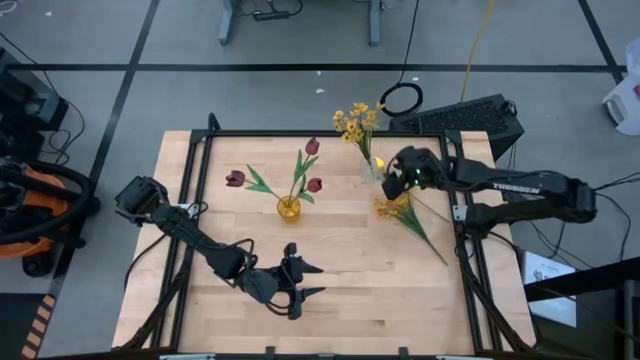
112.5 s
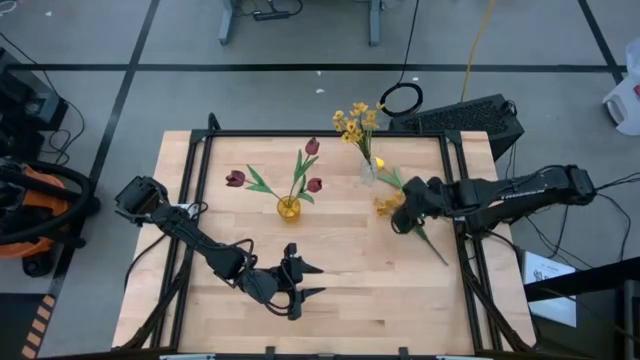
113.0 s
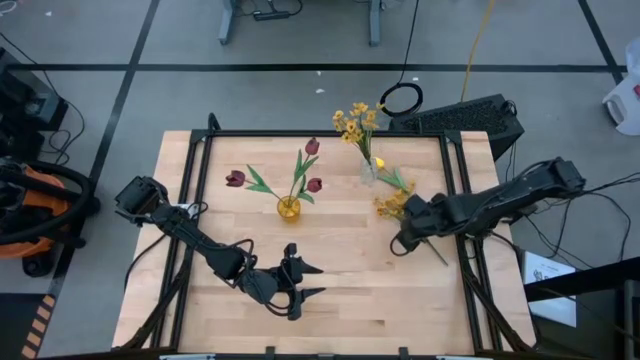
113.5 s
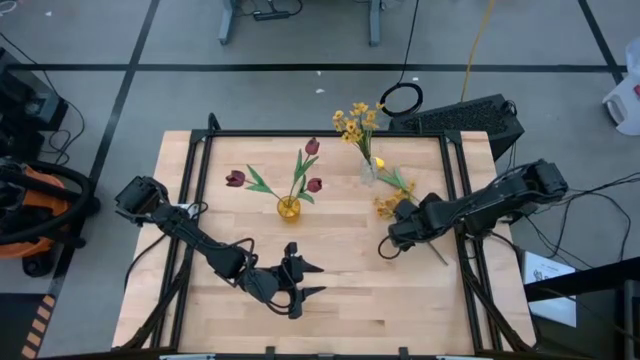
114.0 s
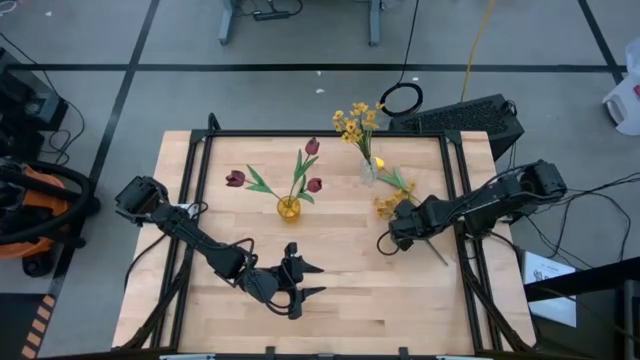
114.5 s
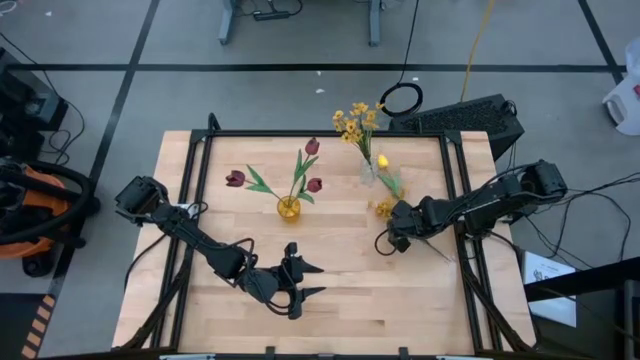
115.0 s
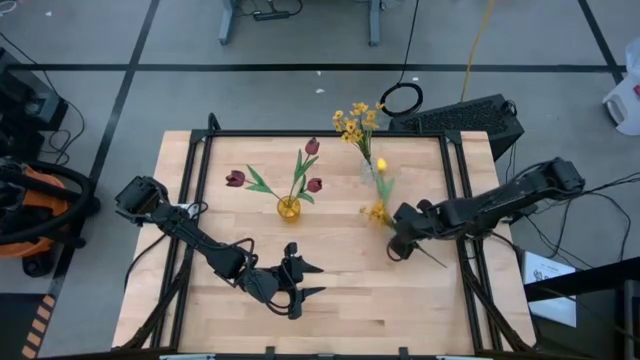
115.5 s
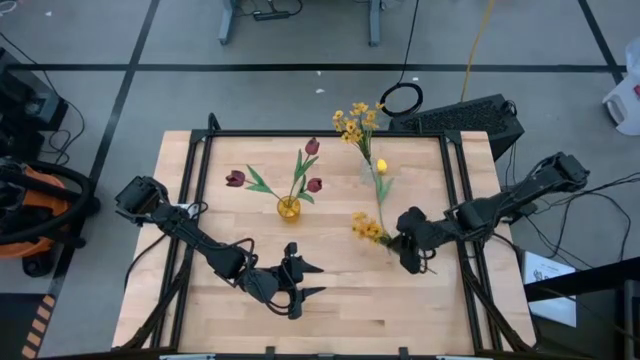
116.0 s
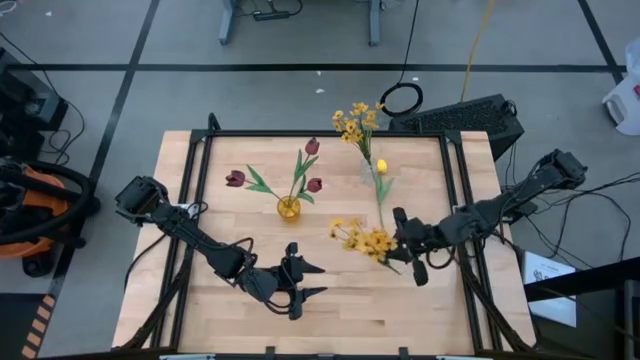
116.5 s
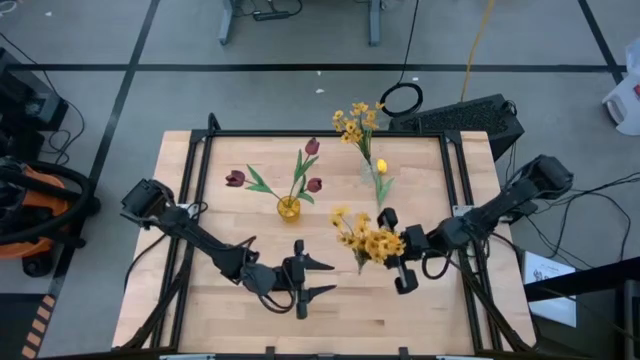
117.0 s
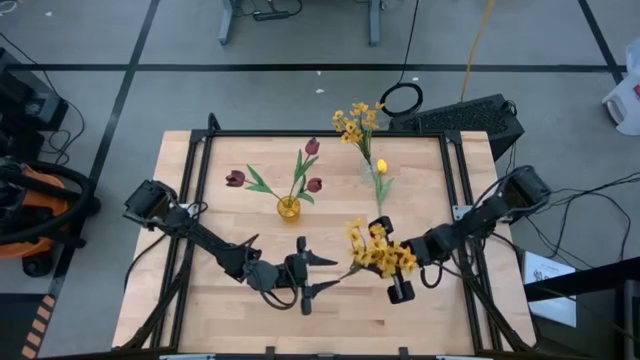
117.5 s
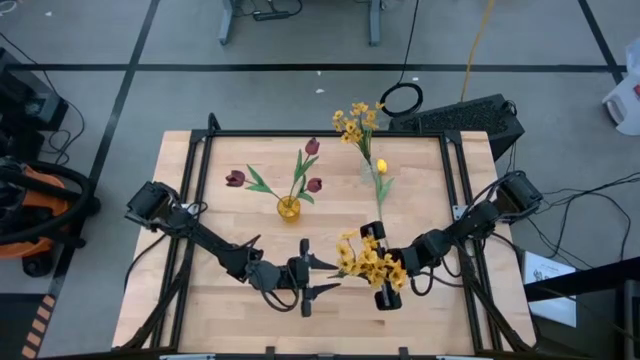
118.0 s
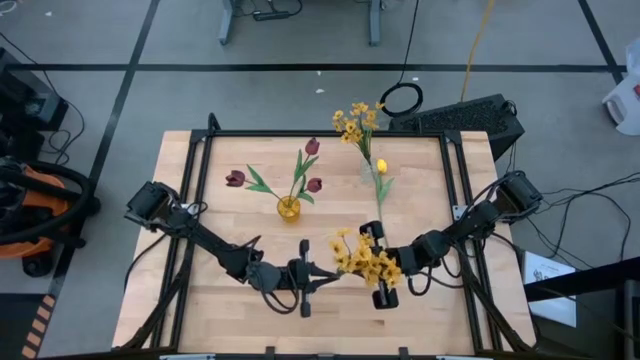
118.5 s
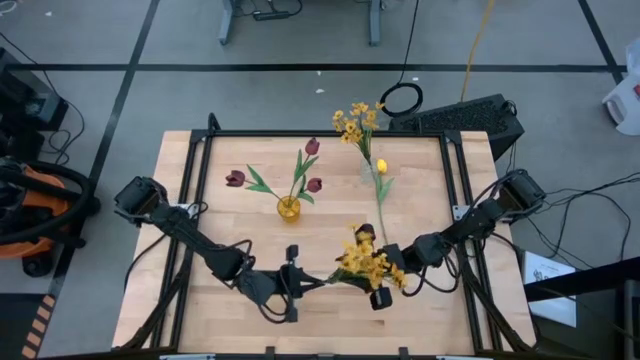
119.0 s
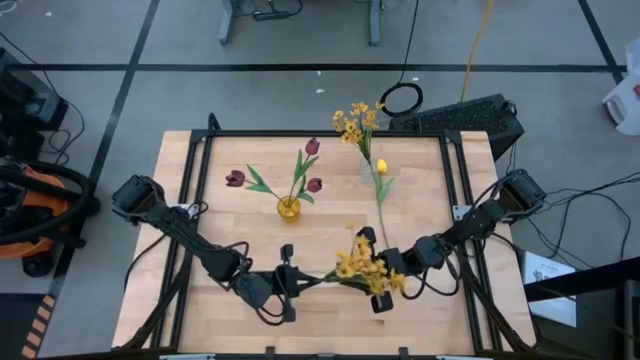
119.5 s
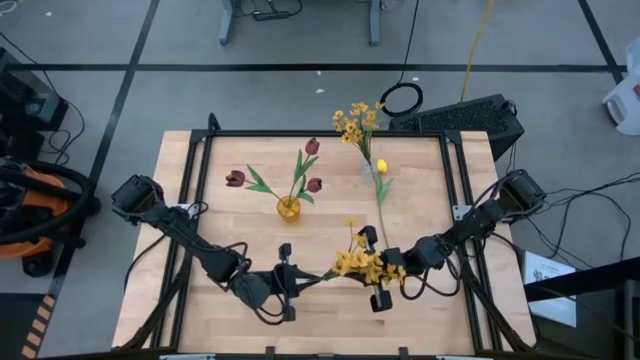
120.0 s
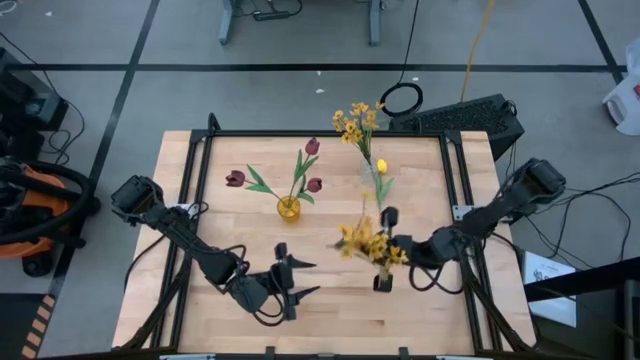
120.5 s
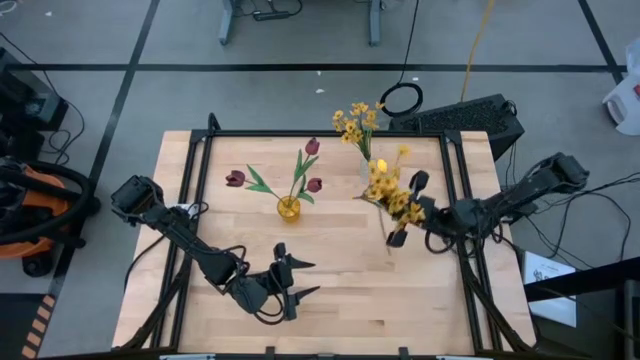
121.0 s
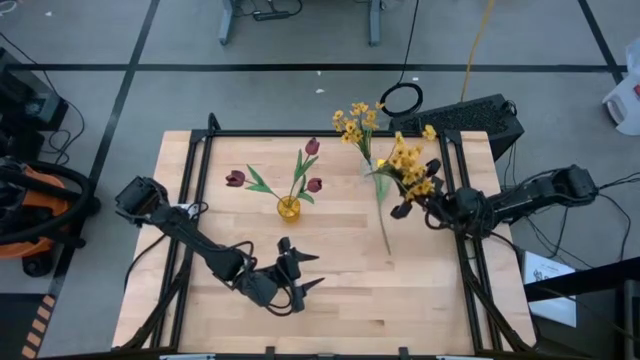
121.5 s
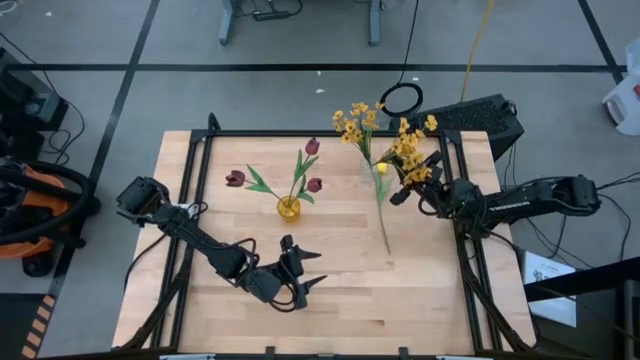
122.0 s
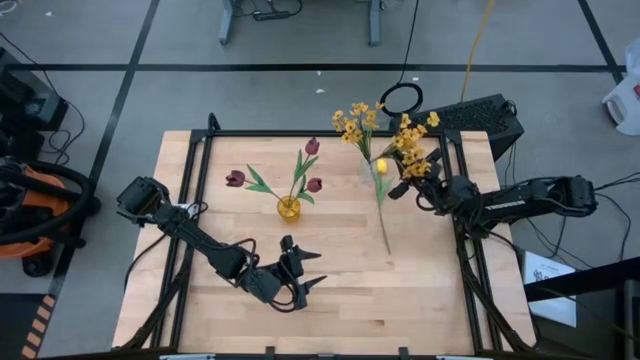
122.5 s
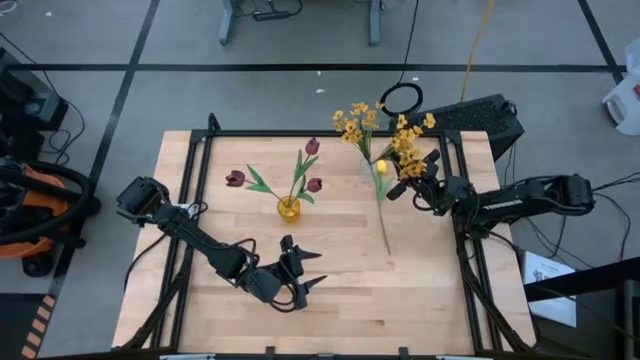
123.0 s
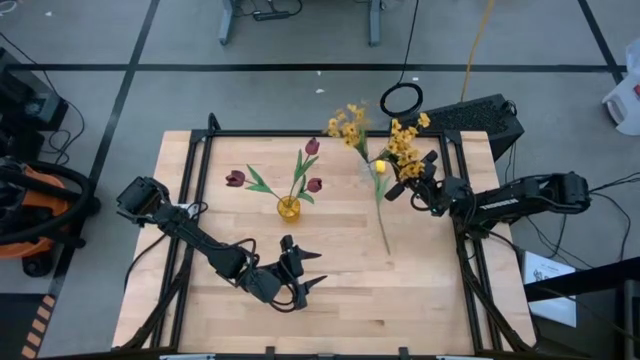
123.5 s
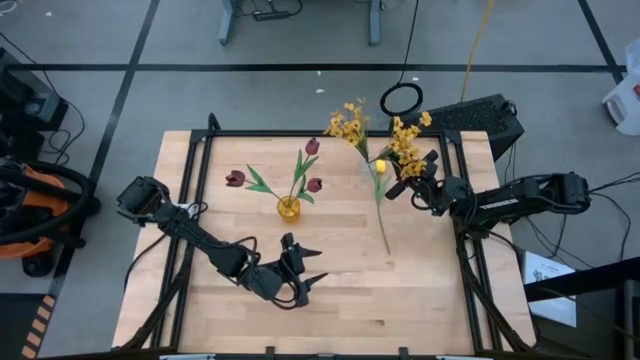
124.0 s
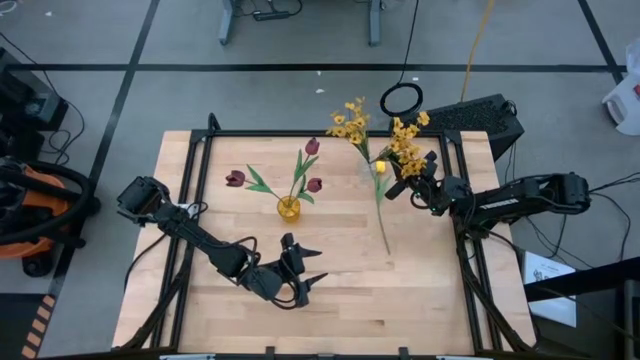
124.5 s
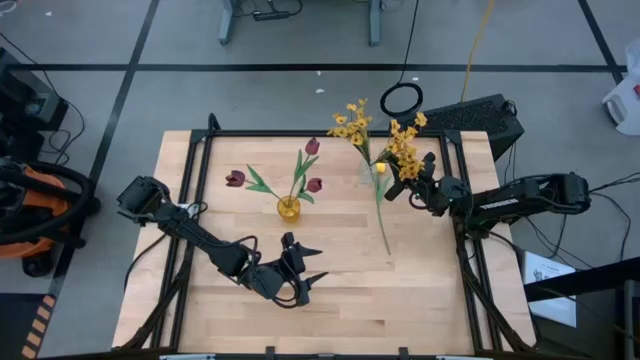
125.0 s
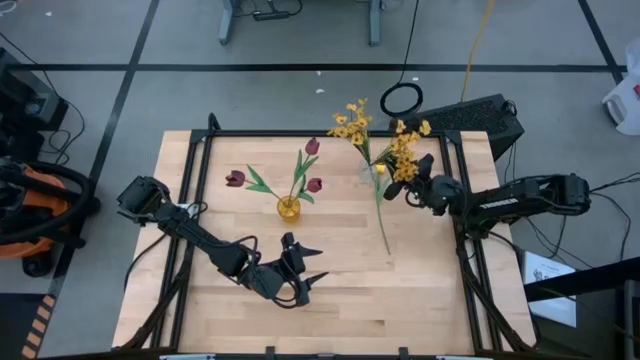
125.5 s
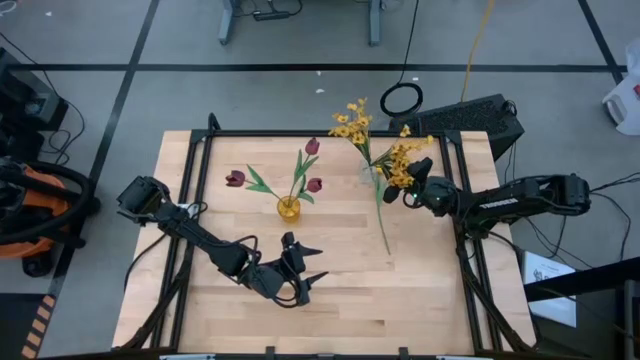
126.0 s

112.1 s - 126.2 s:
Task: Sort flowers into vase by color
Put the yellow flowers into the transparent vase

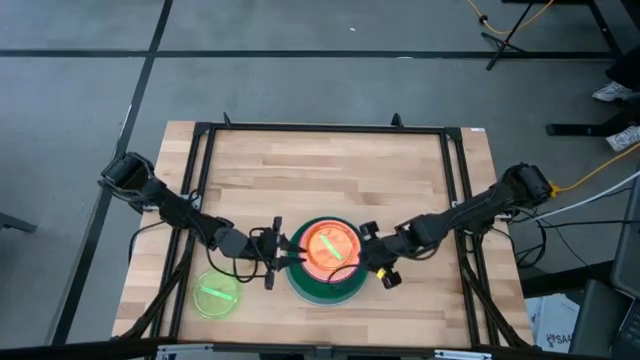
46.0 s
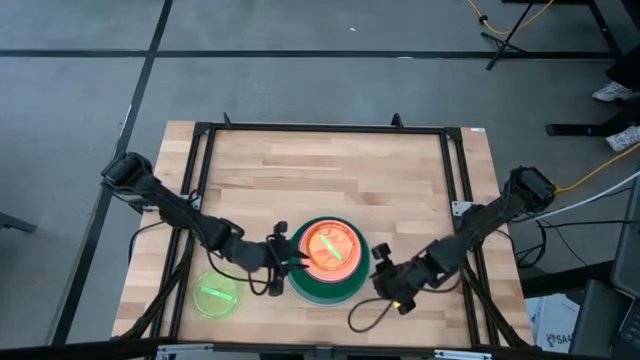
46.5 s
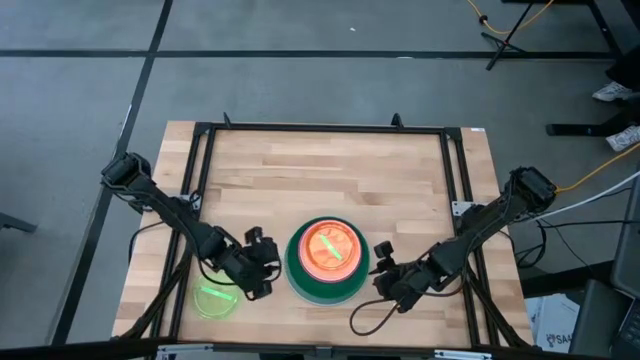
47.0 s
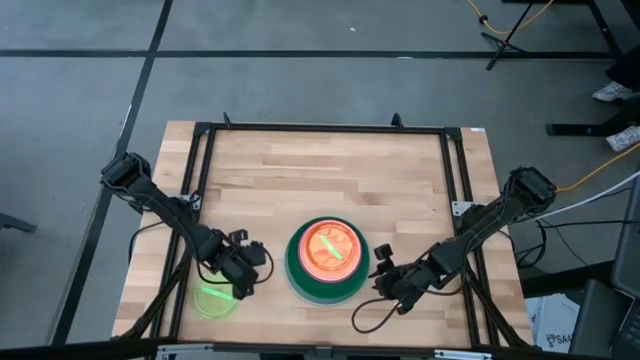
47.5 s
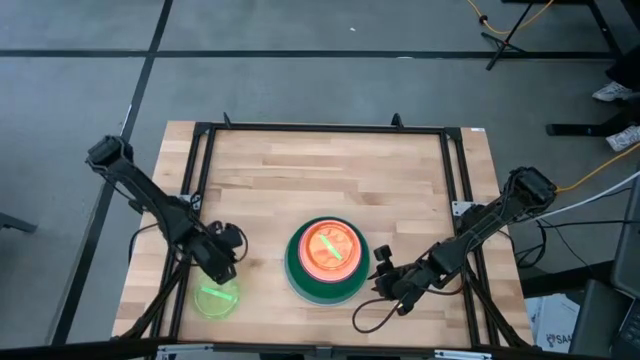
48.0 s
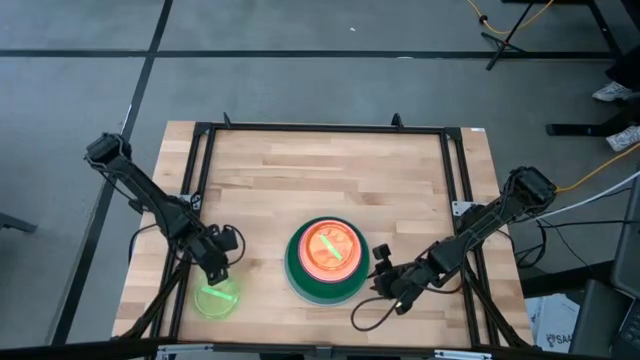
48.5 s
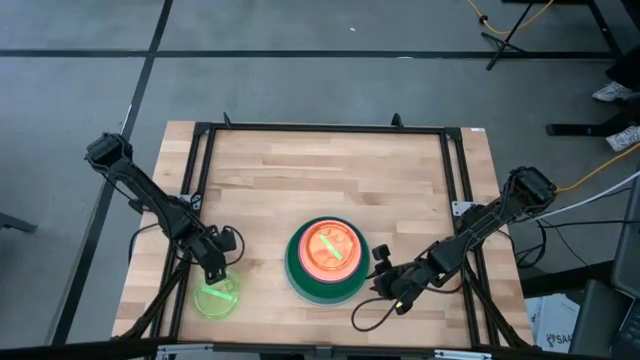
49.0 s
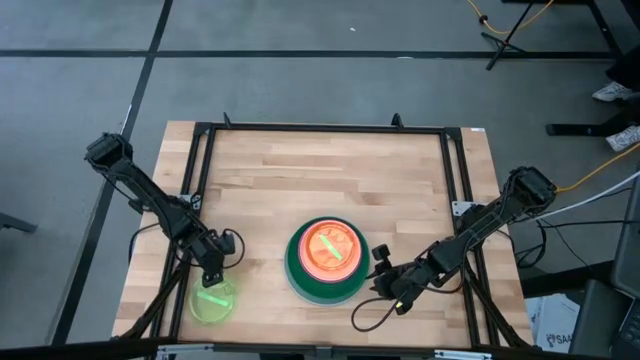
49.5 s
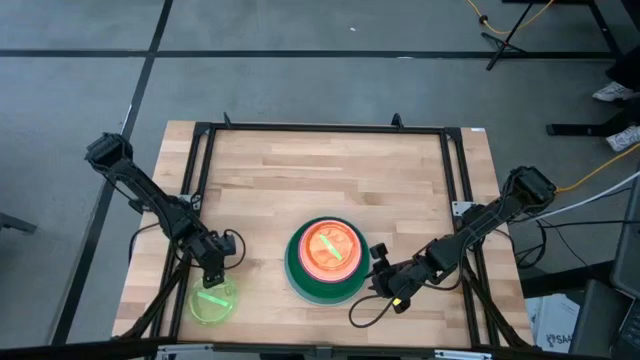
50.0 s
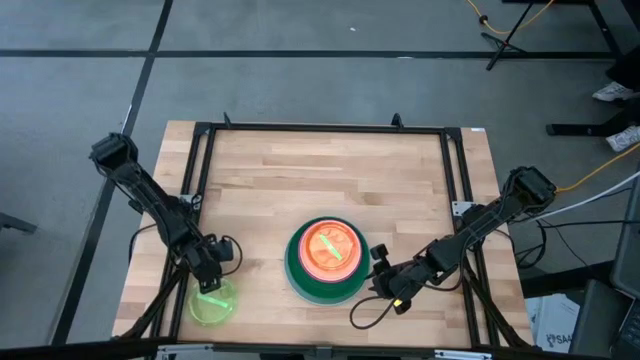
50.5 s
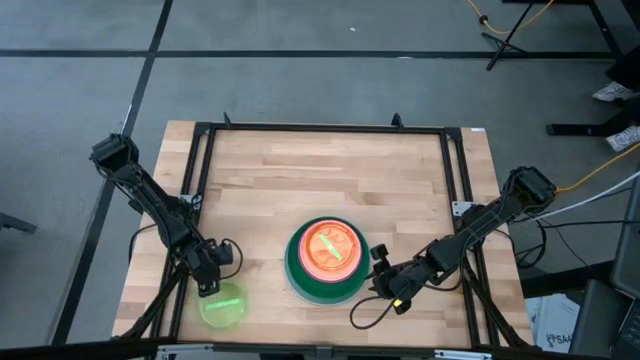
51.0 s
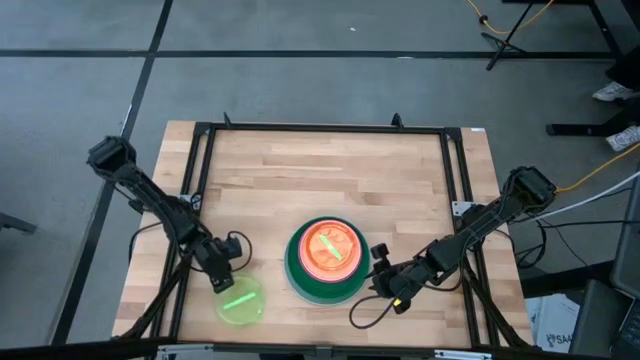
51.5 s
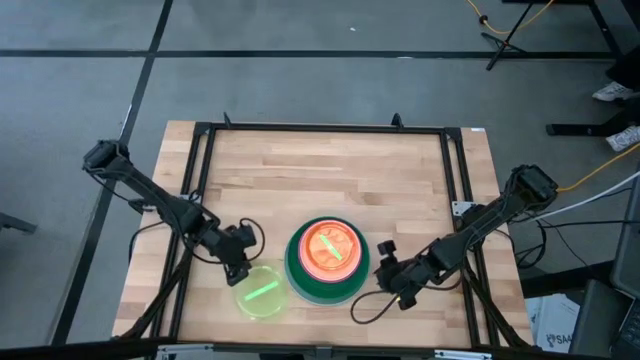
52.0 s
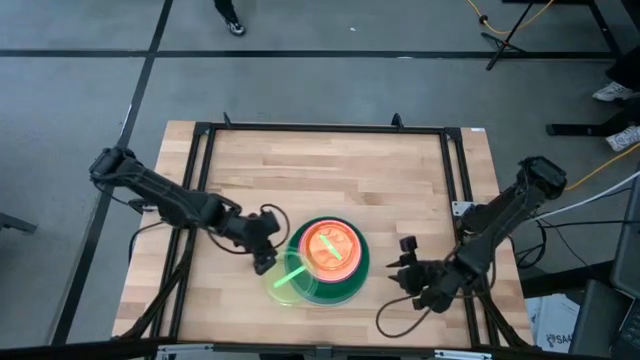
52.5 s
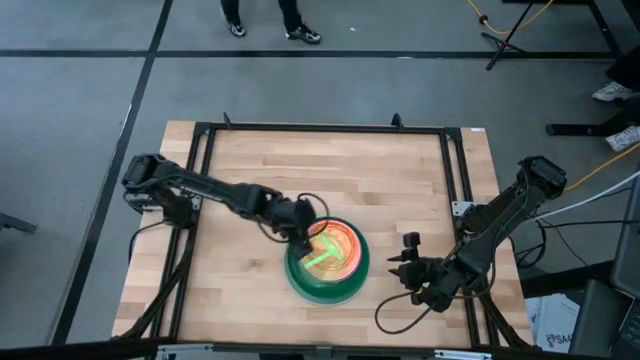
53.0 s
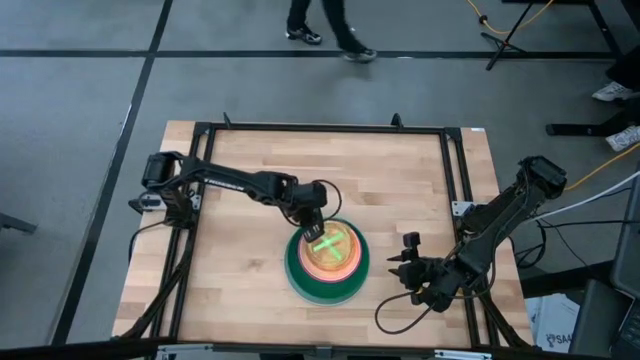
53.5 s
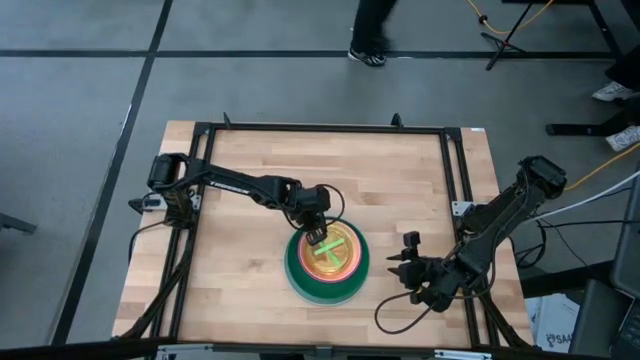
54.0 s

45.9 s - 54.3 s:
Task: Stack plastic plates
Stack the left green plate on top of the right green plate
